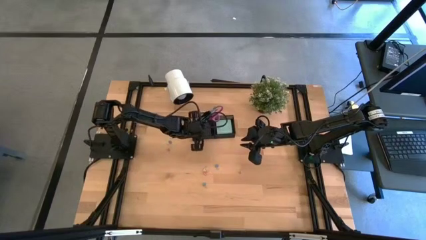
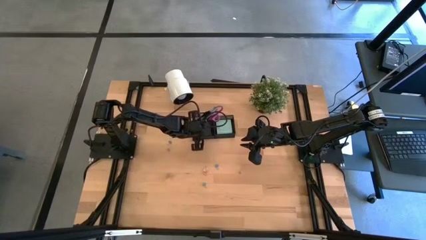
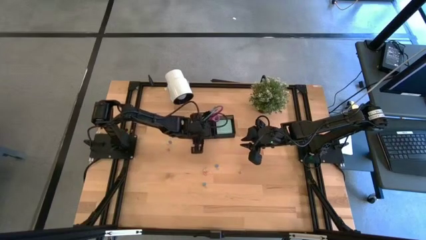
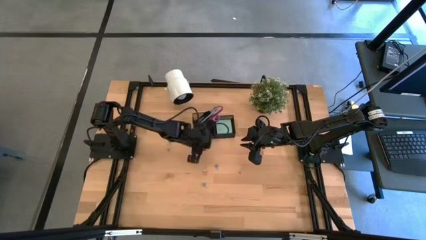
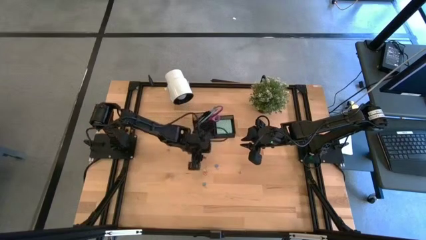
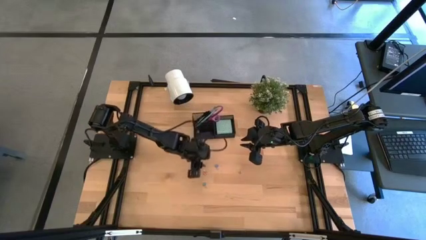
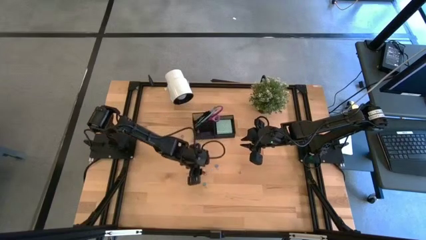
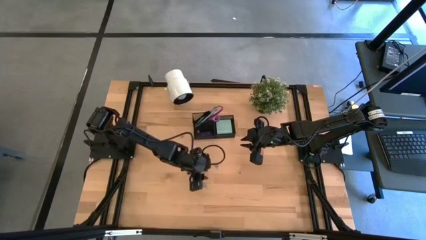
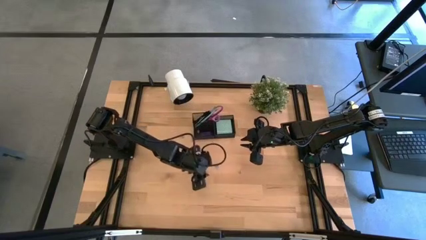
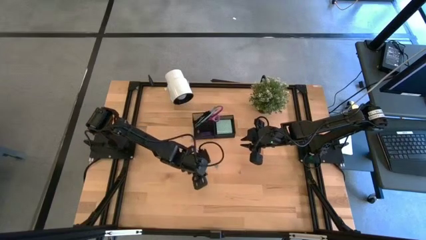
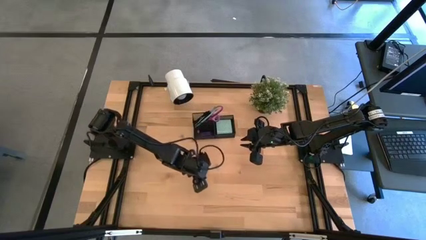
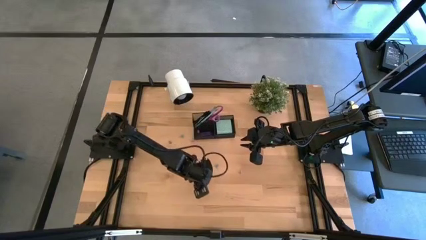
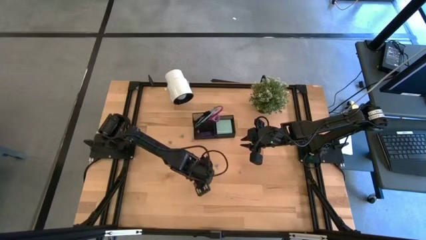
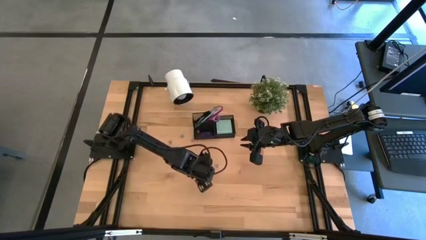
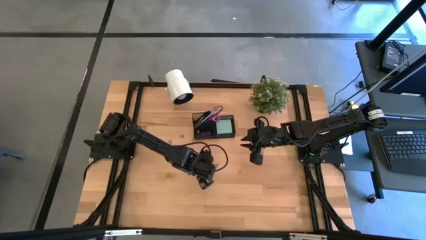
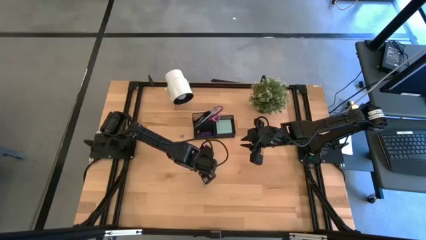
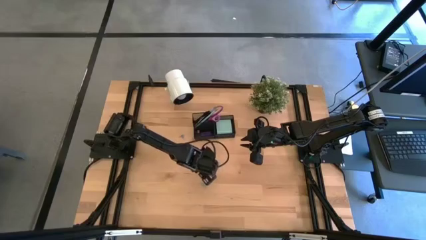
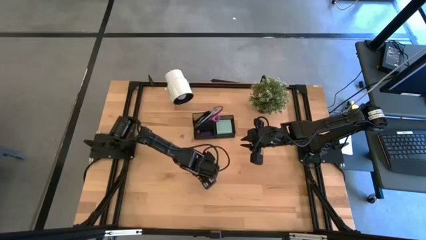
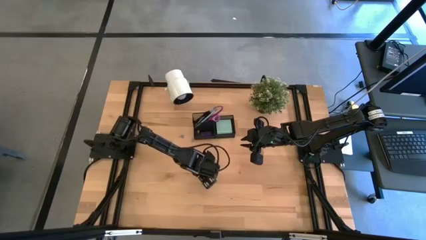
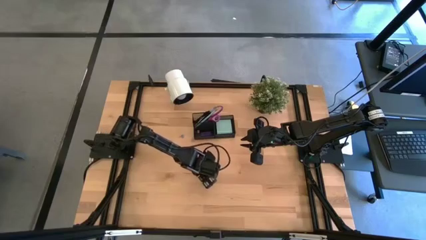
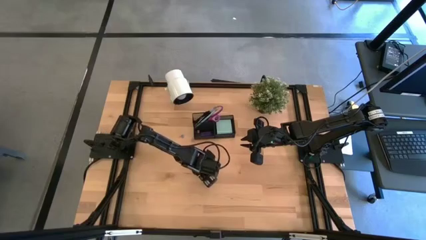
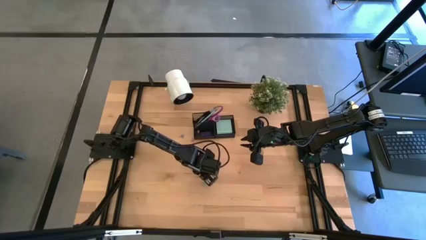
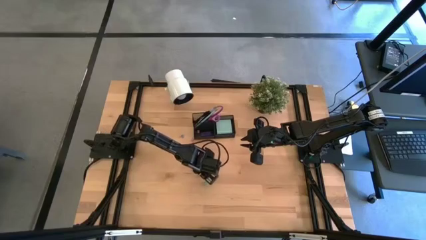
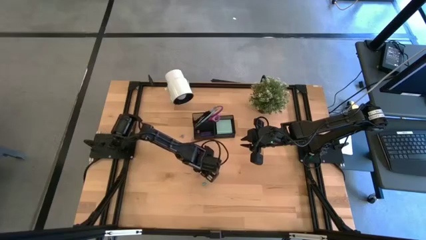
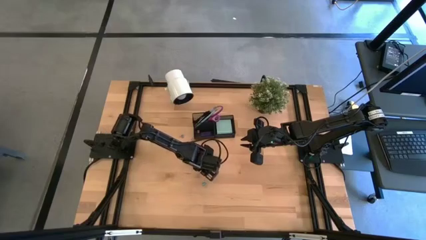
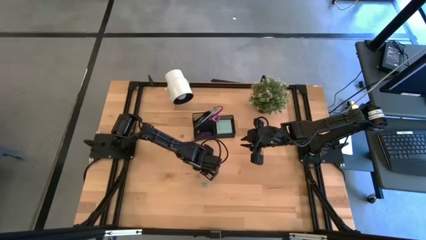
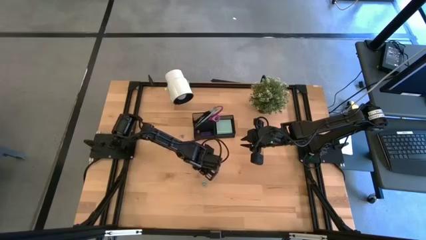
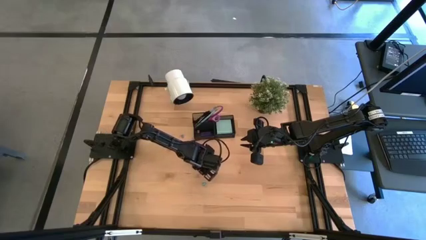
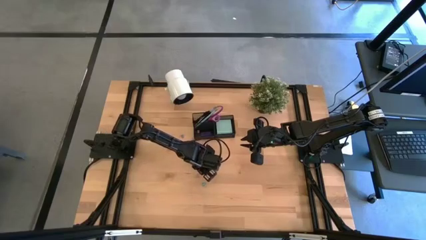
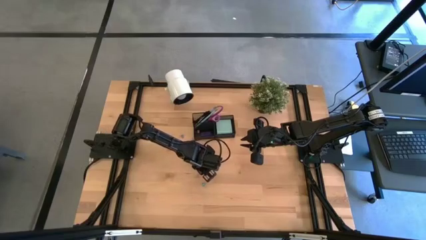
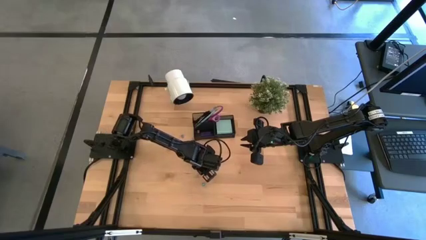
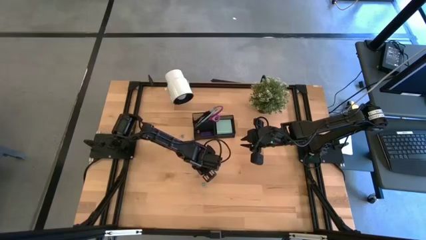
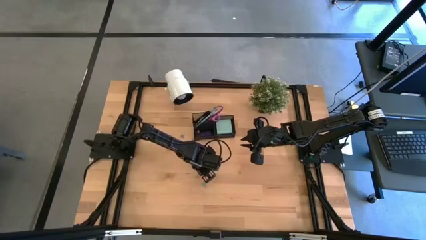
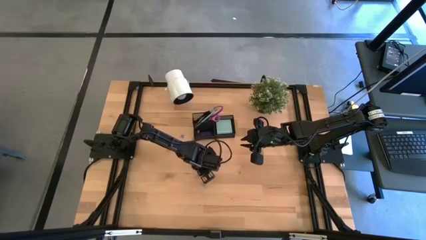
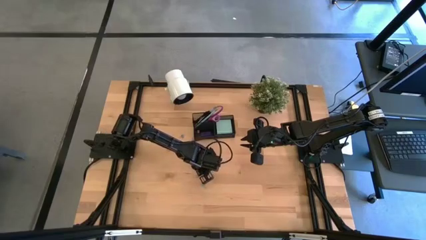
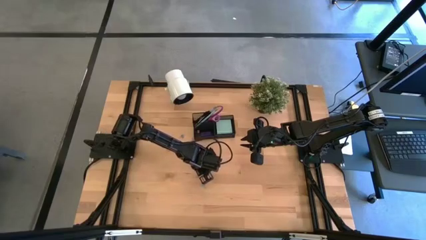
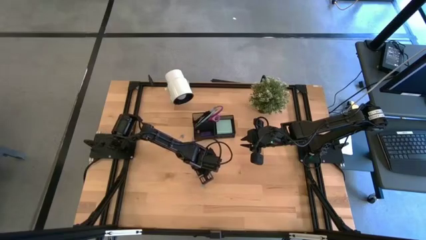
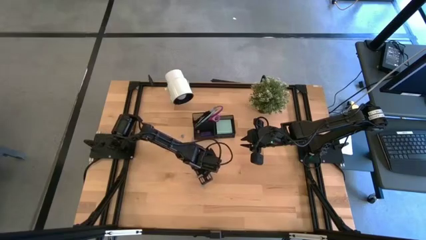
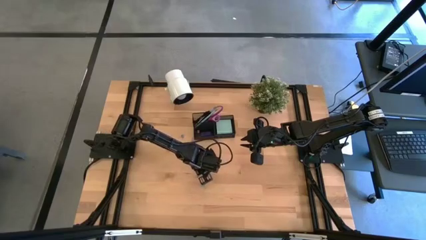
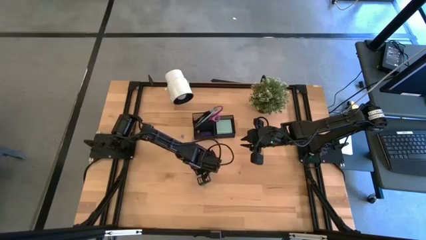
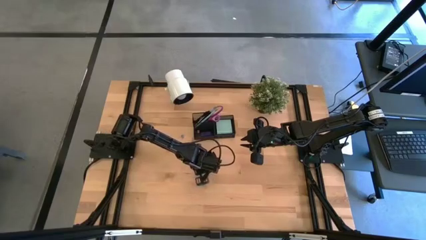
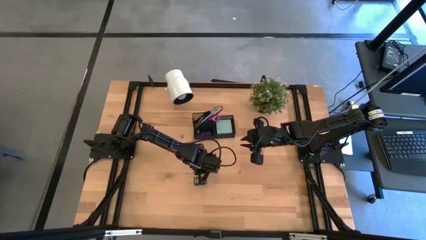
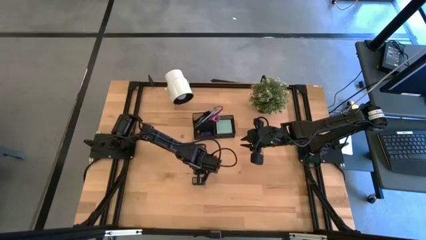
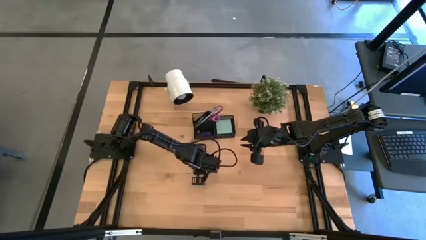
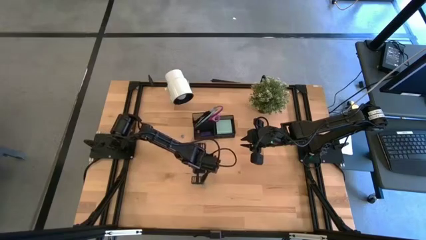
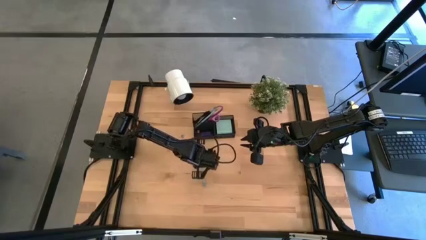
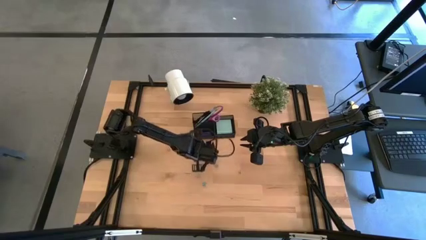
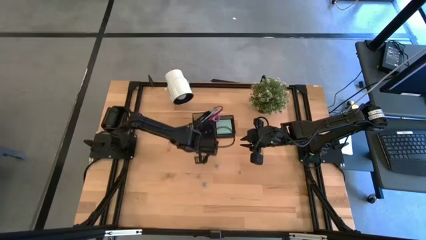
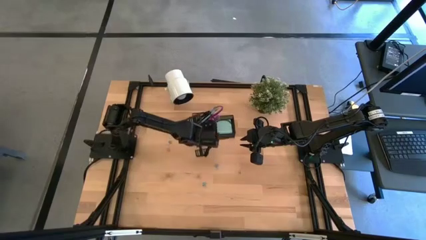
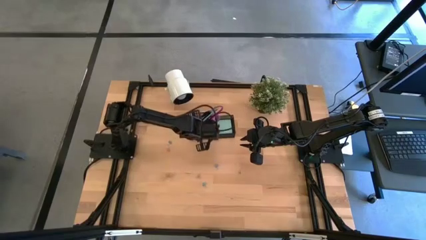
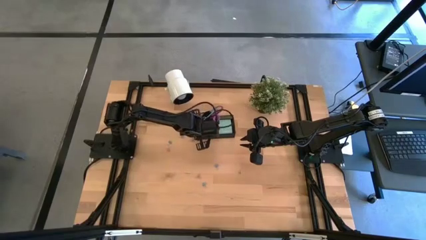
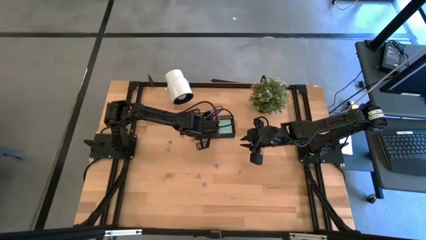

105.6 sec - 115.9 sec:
Task: Pick and place office supplies into organizer
Put the green binder clip into the black desk organizer

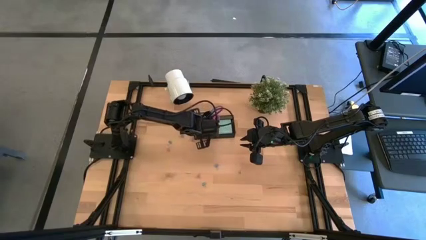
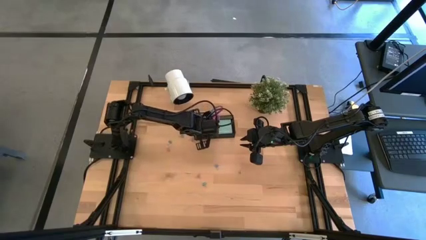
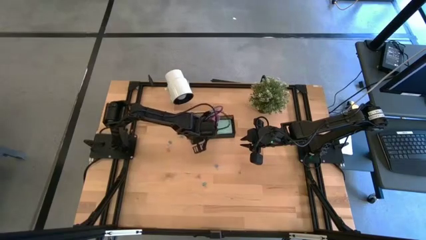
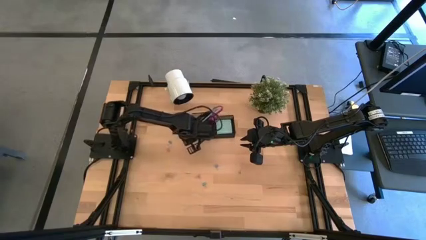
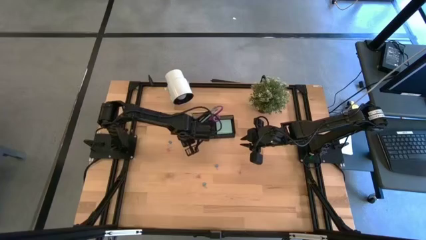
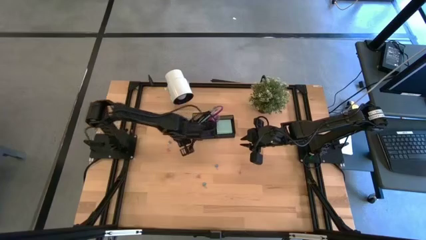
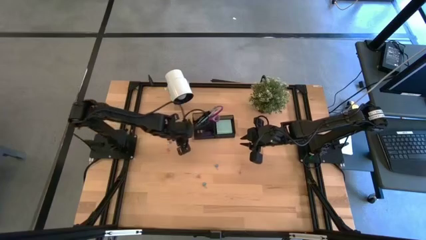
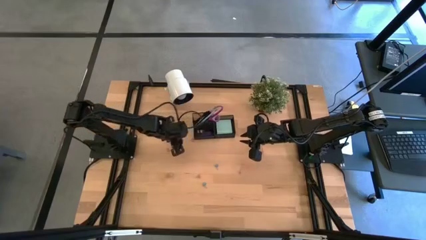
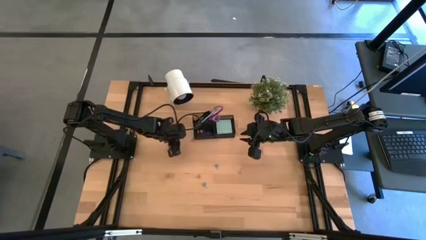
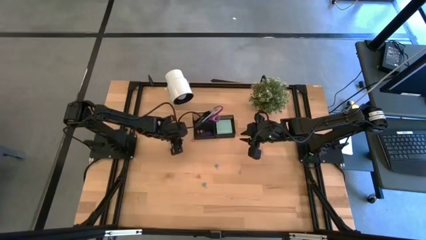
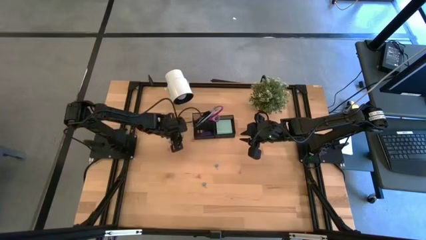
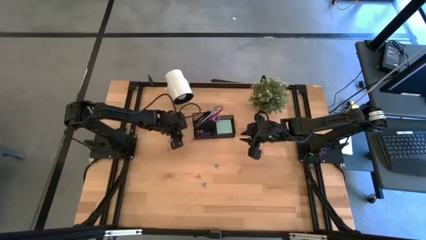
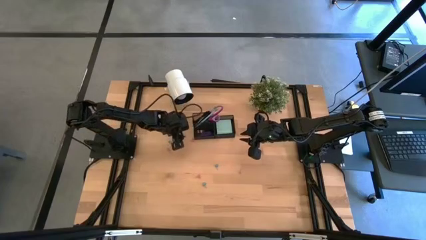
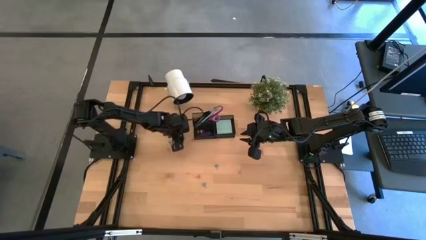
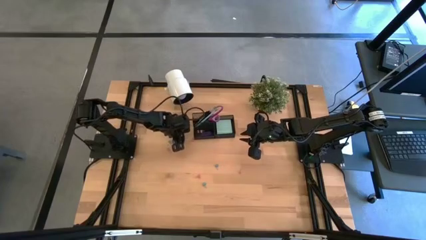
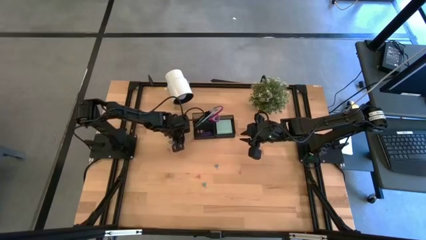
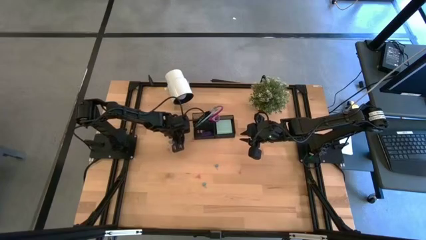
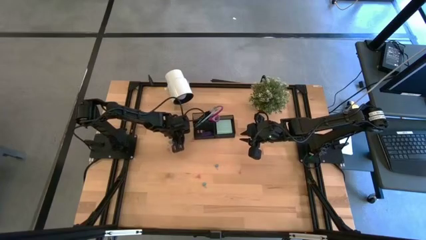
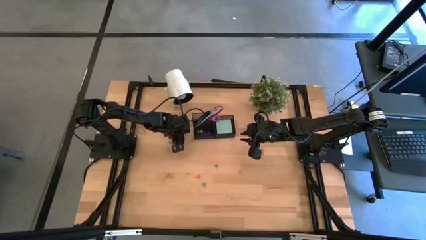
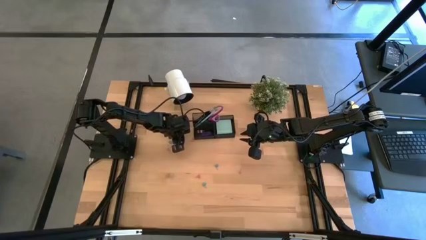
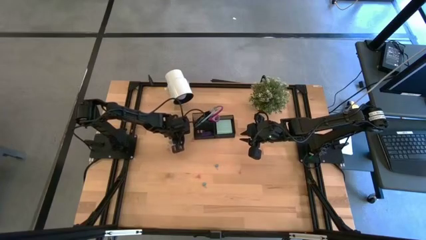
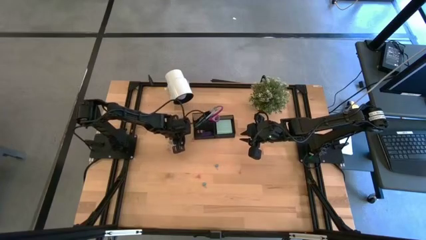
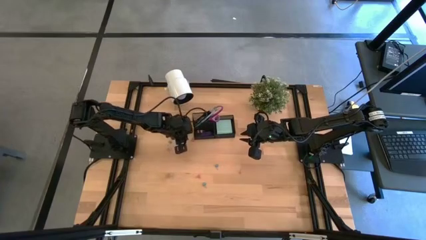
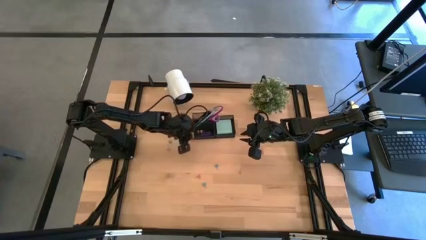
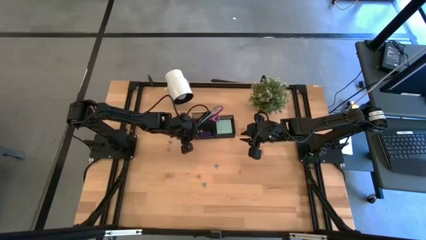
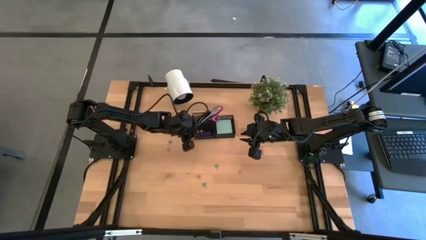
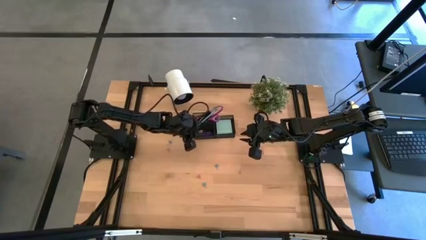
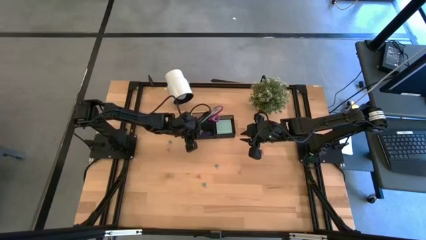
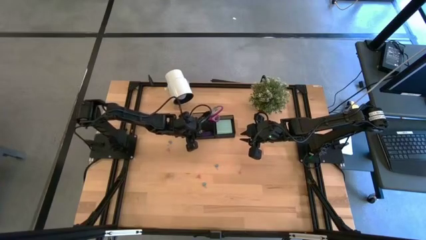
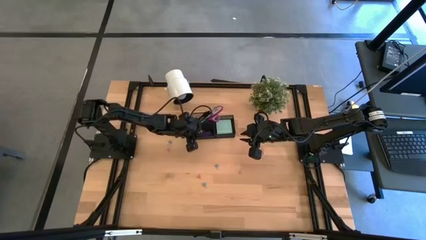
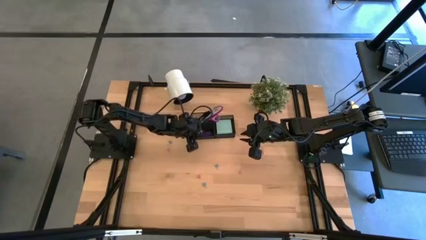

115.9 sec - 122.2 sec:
Put the blue binder clip into the black desk organizer

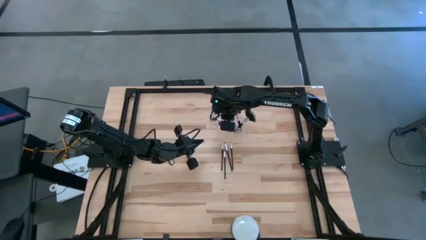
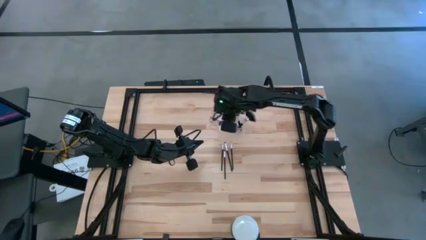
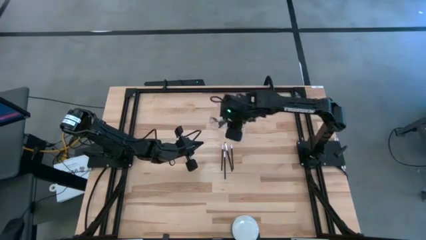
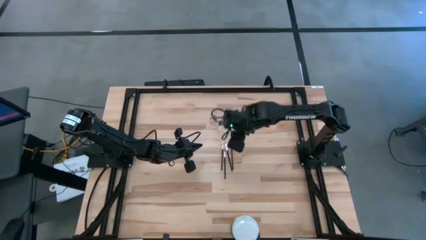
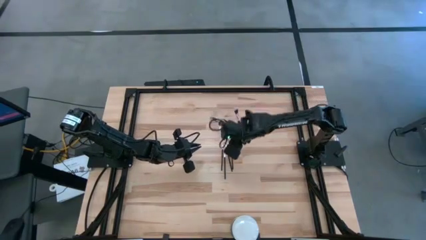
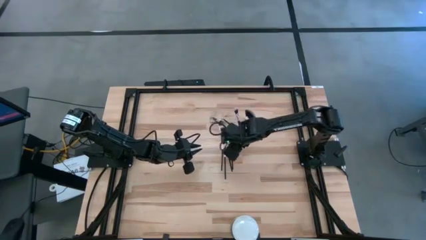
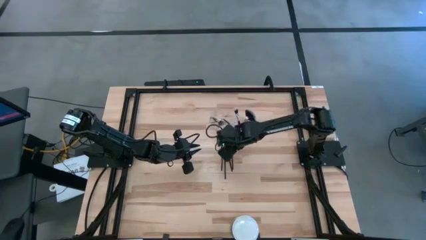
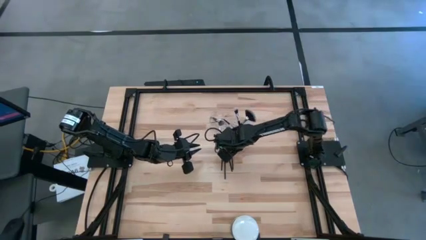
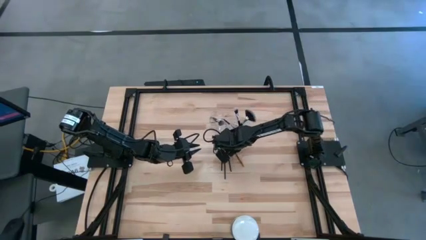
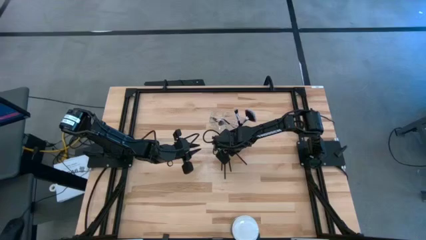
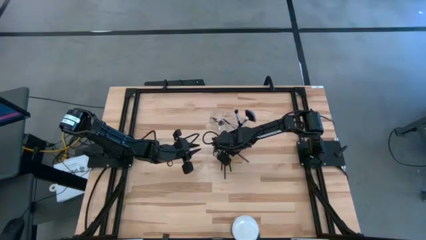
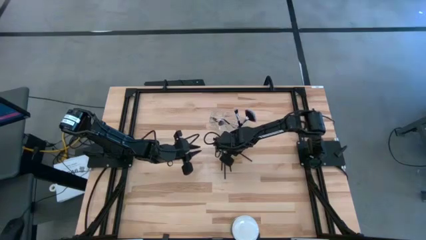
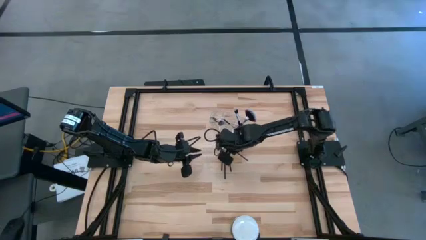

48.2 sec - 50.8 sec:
Task: Put items in baskets/containers
Put the black liner brush into the transparent organizer
